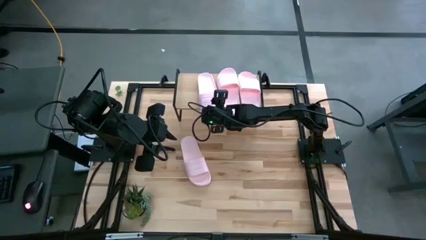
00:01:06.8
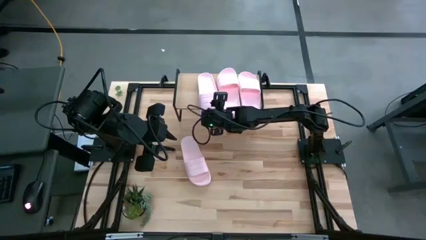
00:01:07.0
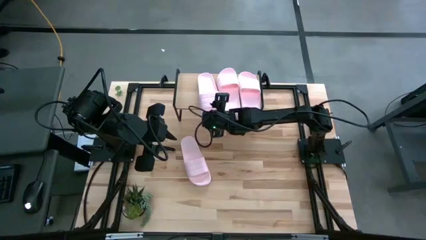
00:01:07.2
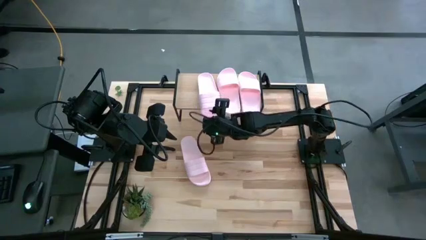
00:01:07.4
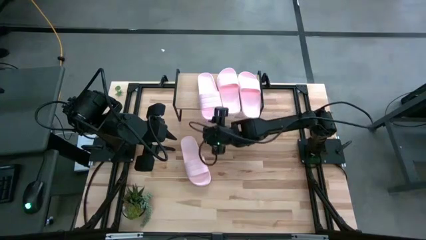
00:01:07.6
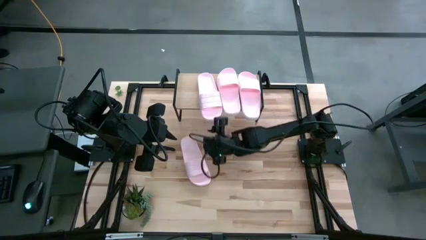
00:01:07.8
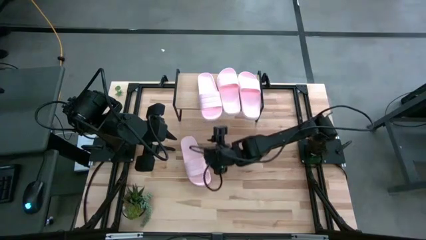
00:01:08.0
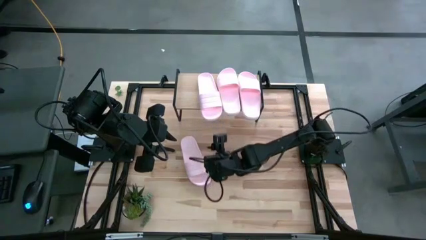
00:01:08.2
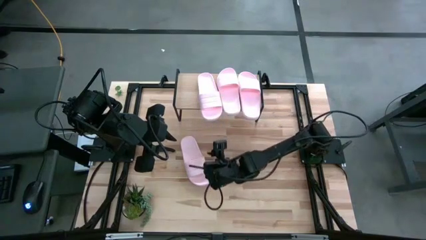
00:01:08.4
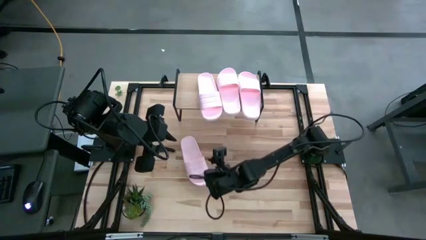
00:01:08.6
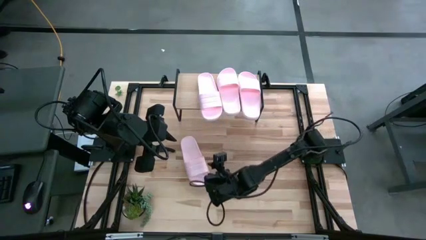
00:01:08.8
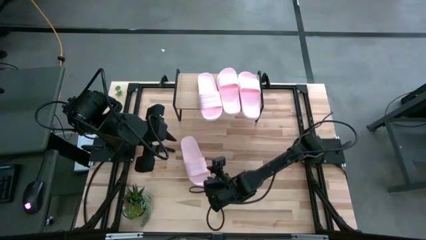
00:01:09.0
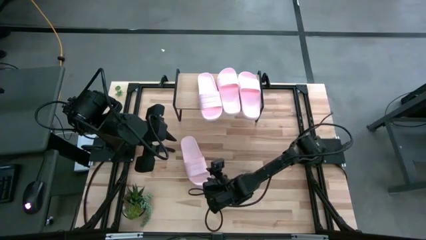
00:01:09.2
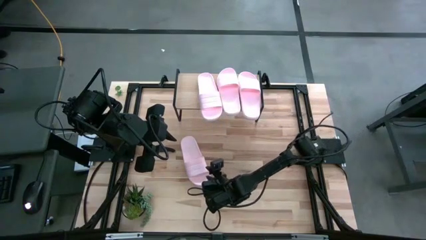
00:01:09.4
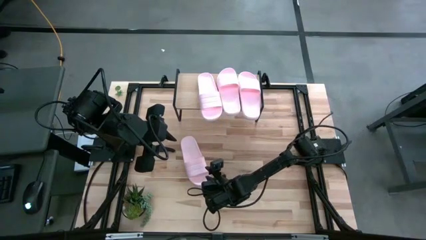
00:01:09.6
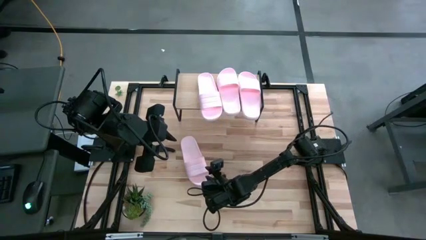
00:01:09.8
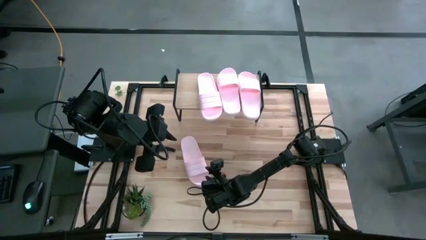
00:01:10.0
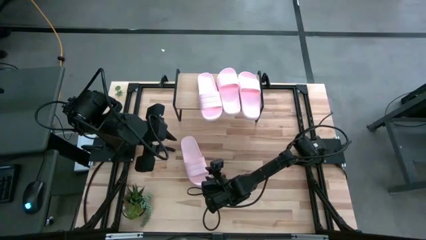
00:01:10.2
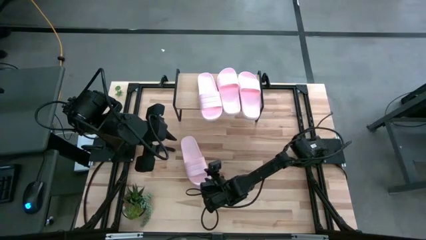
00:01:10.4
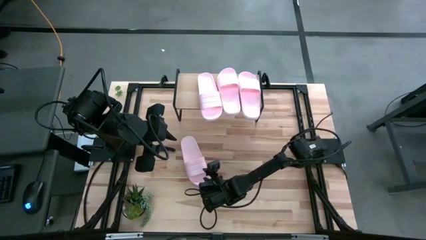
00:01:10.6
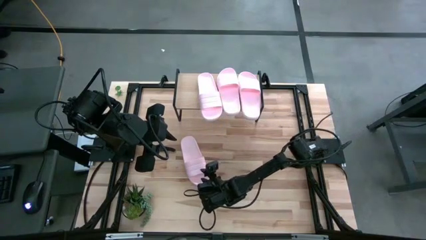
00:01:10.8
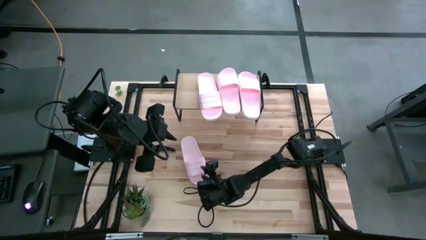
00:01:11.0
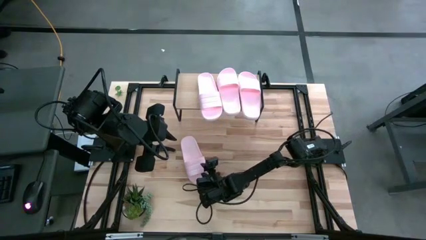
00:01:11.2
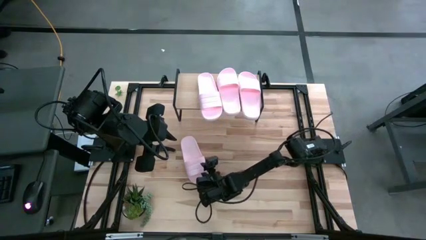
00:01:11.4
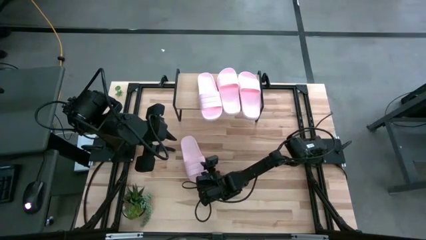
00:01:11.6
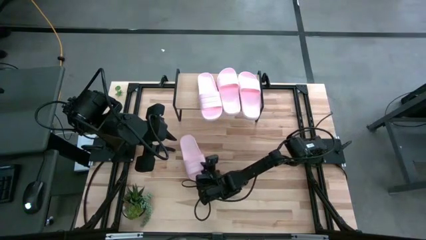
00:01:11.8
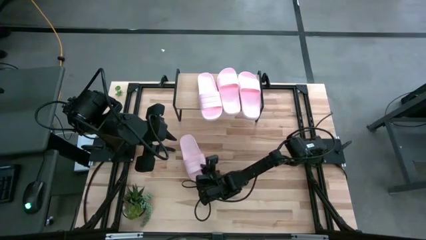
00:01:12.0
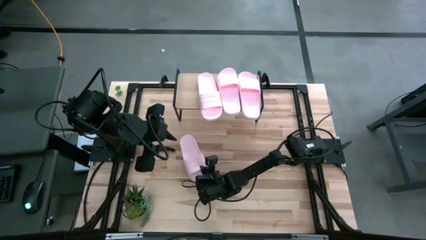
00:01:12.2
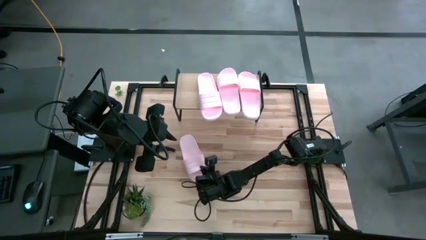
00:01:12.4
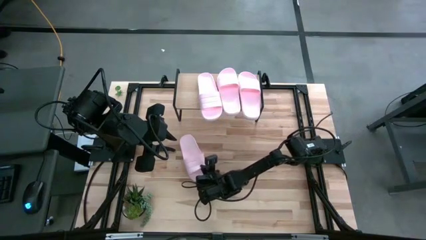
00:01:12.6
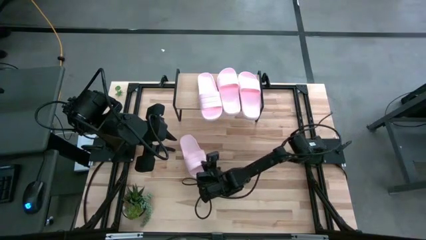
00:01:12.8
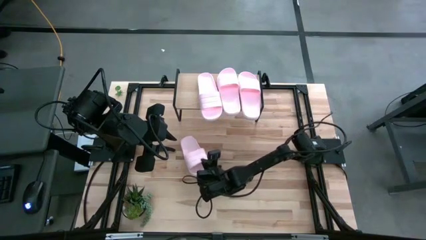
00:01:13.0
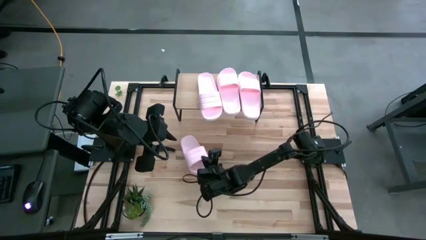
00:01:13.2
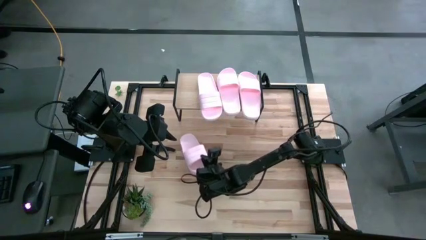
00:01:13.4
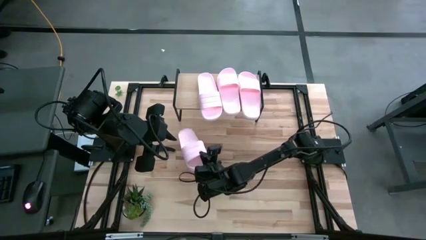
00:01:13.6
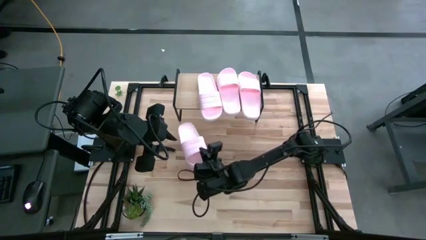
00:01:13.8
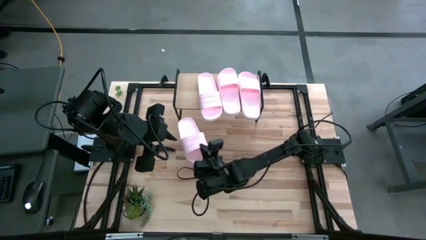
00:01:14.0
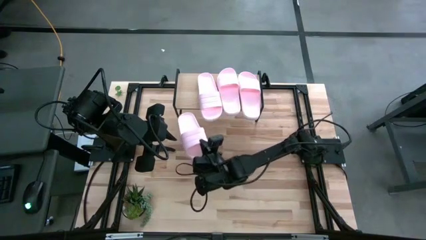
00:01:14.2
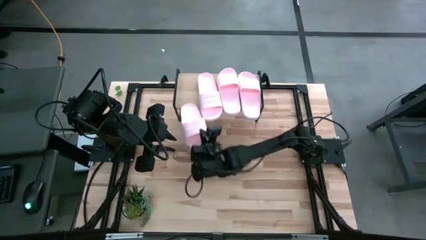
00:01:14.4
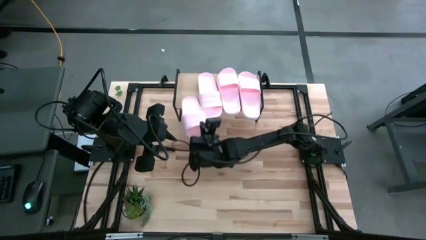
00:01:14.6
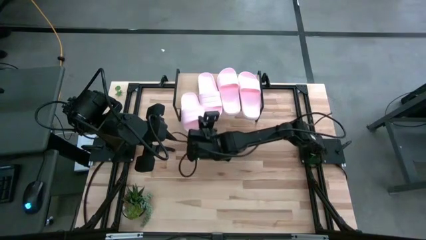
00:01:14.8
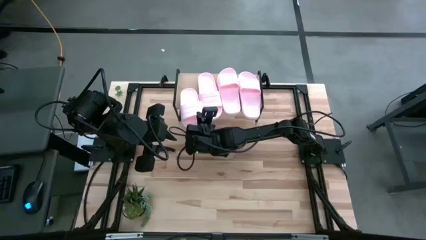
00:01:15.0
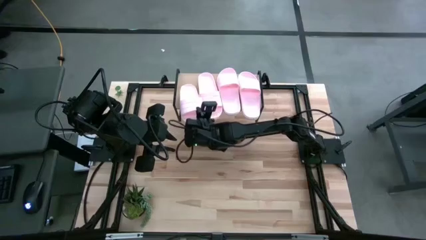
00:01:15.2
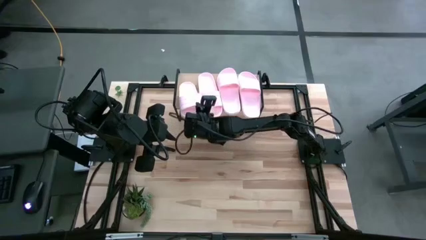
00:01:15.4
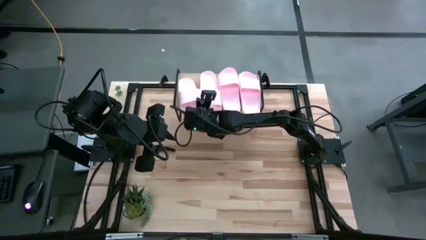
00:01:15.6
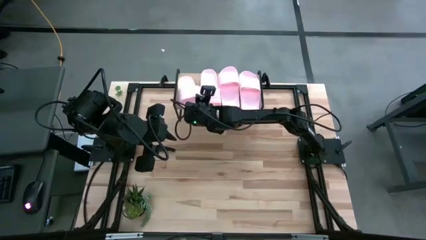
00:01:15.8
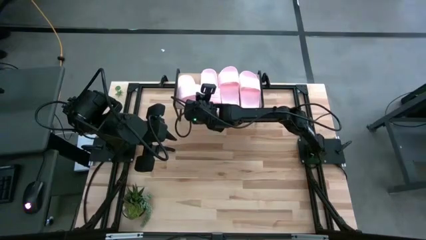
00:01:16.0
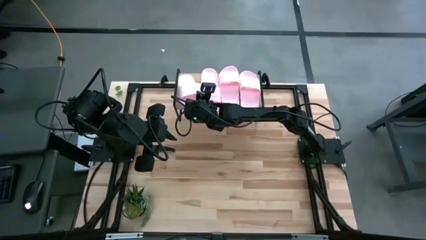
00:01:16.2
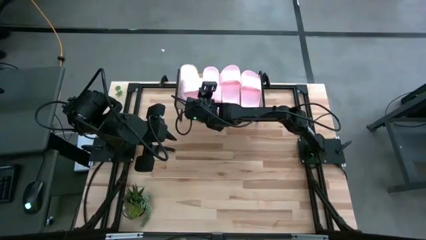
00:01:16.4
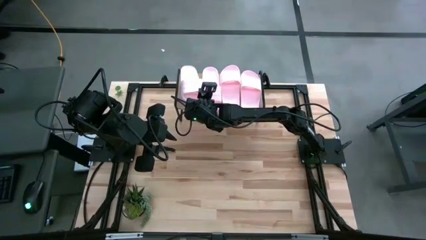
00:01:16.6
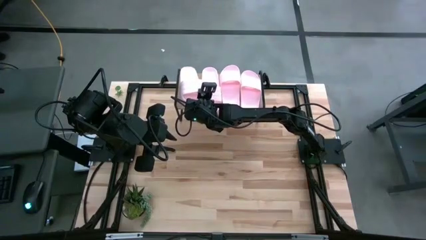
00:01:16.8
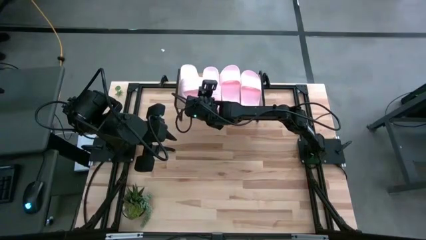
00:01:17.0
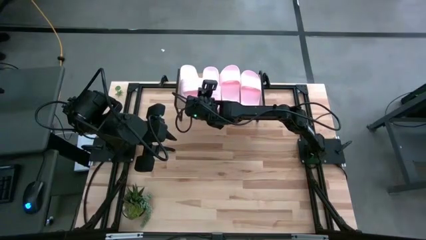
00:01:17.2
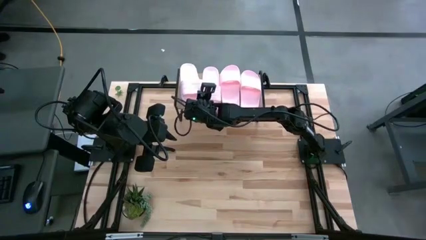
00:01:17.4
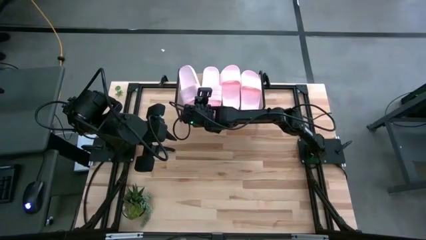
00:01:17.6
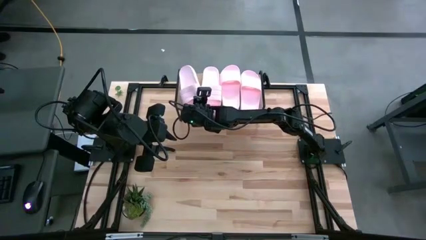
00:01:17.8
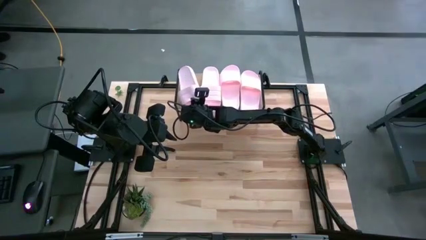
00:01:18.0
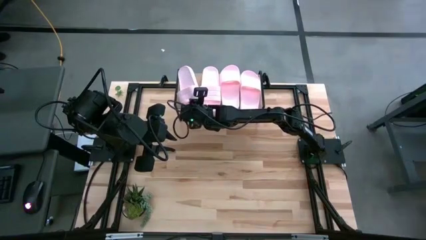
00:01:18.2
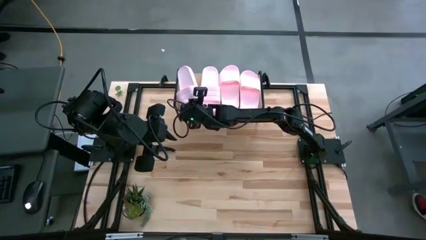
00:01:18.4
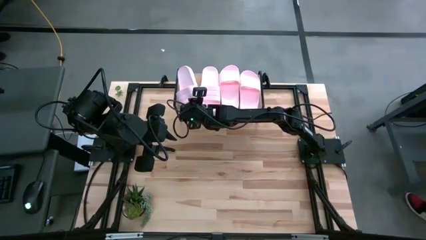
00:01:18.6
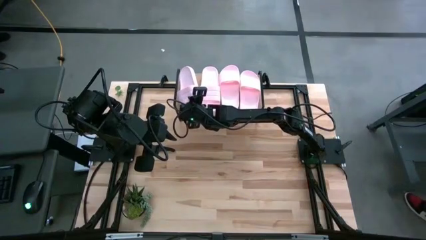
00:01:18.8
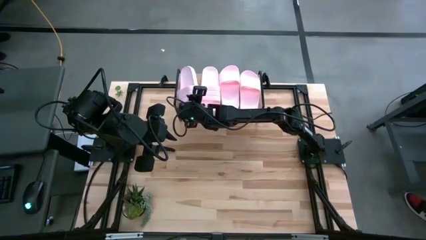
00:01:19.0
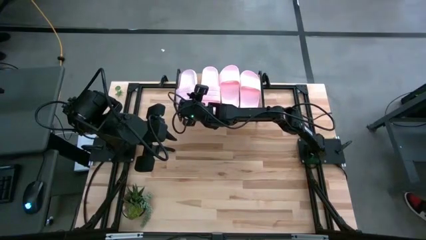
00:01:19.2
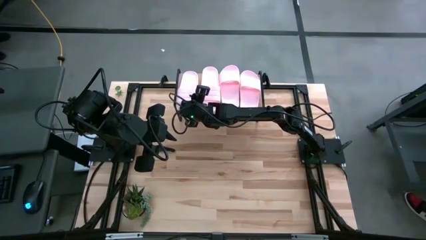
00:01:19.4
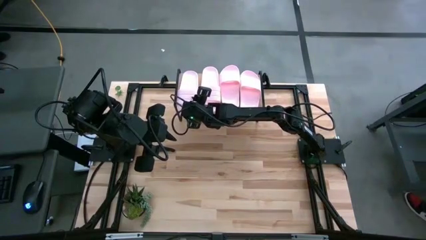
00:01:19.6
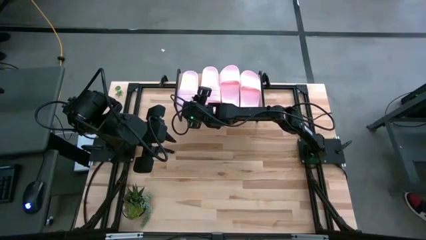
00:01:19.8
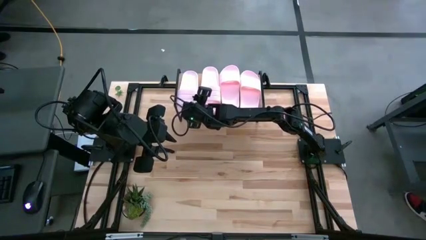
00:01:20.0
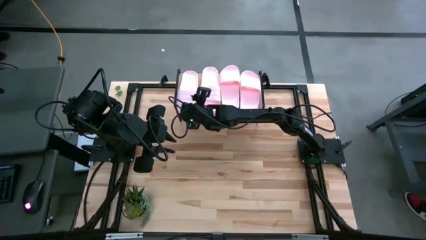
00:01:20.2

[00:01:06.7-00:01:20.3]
Task: Pick and place slides into the shelf
Put the white slide on the shelf
